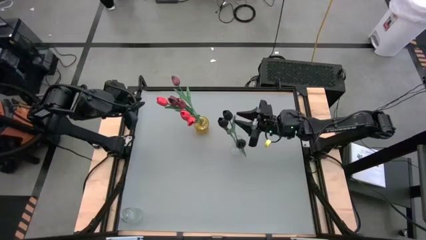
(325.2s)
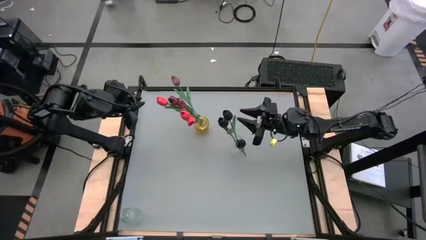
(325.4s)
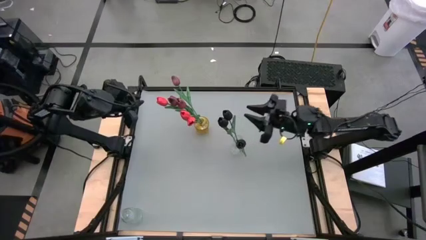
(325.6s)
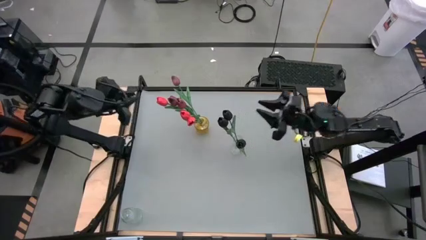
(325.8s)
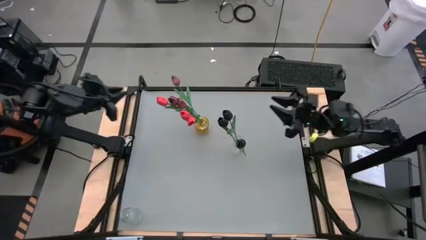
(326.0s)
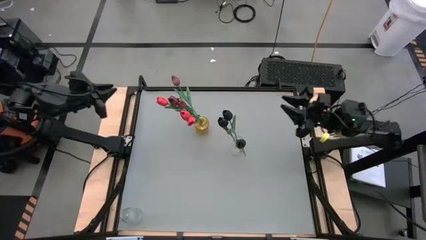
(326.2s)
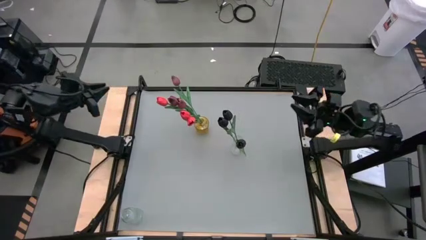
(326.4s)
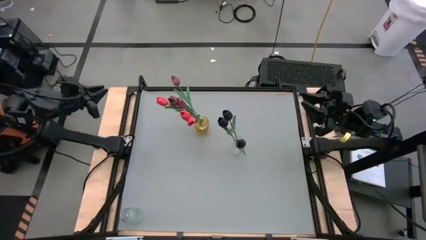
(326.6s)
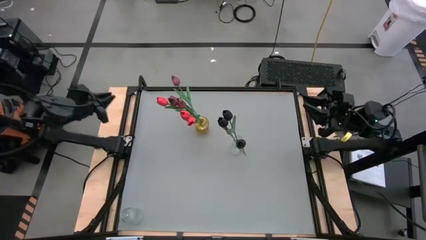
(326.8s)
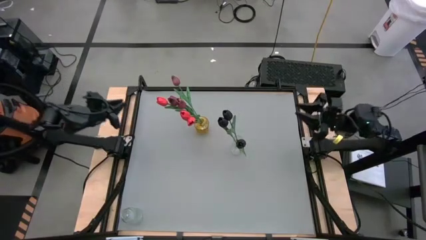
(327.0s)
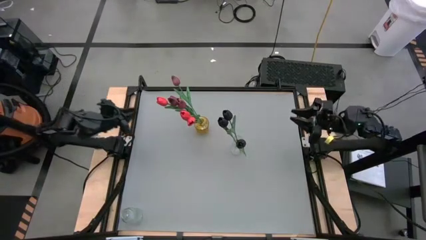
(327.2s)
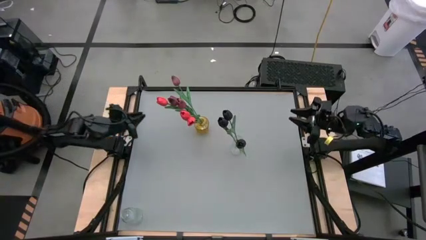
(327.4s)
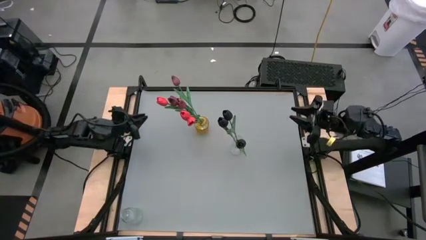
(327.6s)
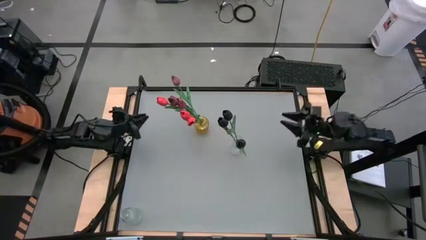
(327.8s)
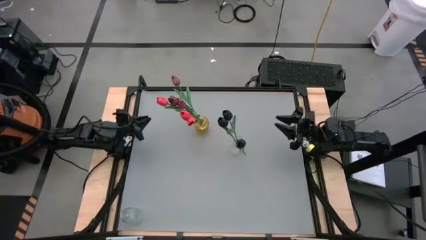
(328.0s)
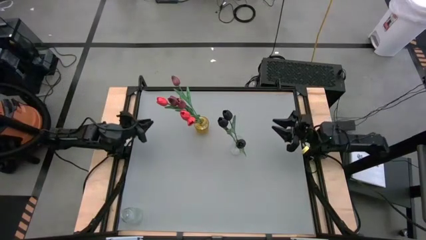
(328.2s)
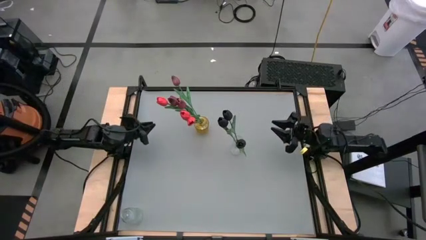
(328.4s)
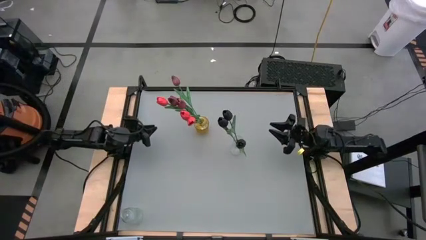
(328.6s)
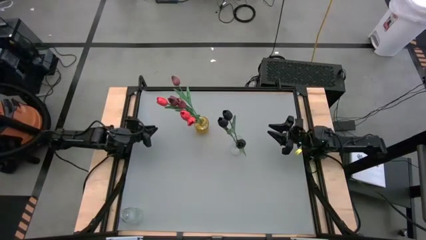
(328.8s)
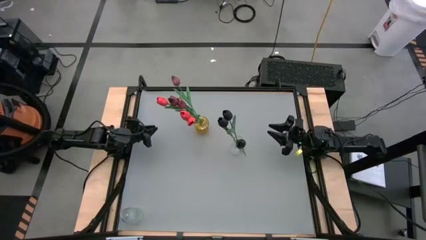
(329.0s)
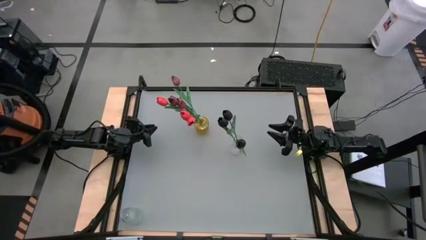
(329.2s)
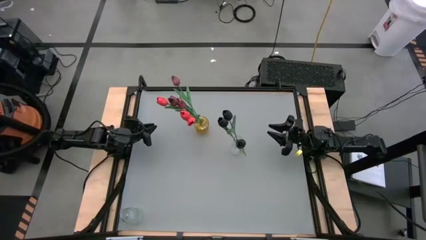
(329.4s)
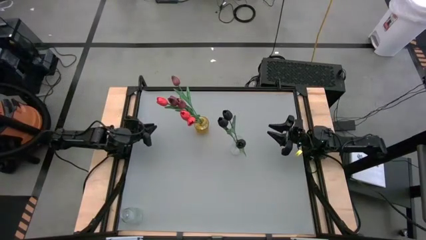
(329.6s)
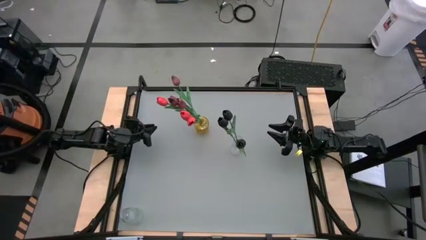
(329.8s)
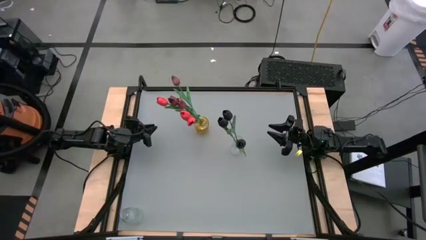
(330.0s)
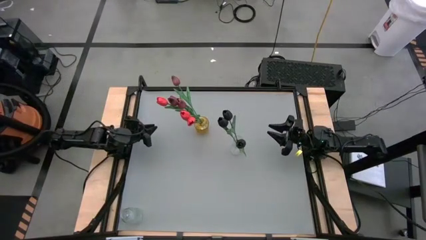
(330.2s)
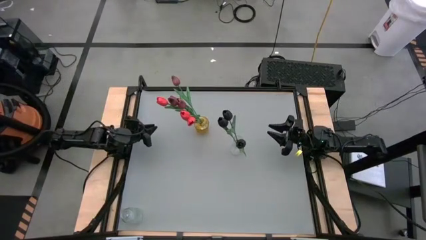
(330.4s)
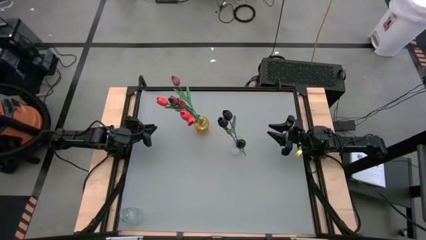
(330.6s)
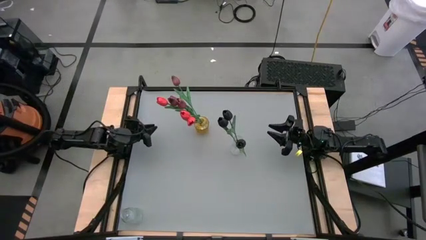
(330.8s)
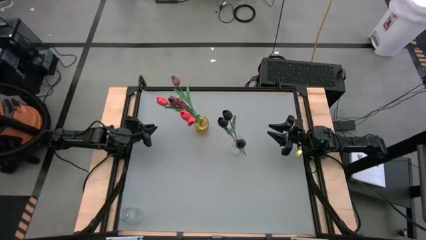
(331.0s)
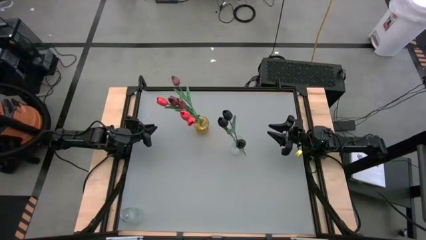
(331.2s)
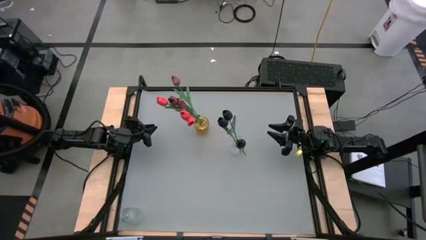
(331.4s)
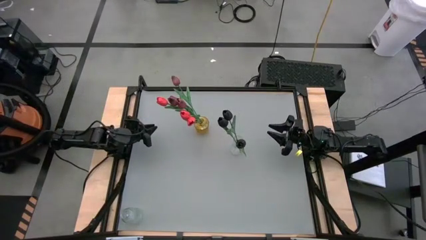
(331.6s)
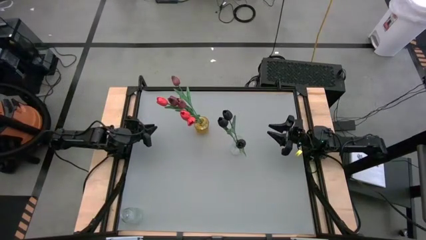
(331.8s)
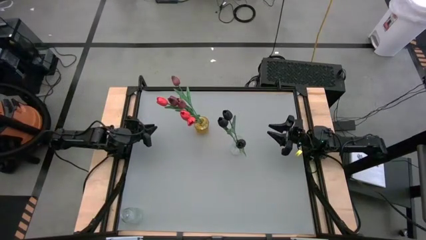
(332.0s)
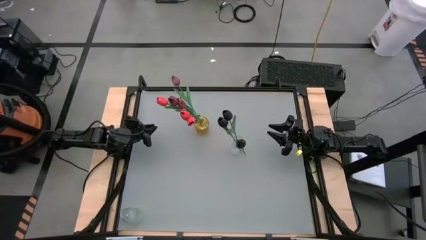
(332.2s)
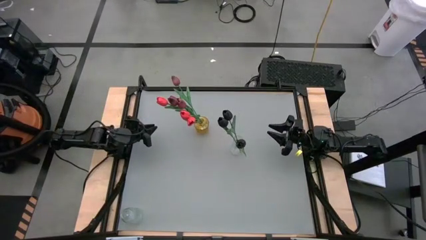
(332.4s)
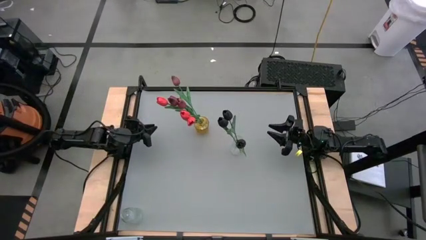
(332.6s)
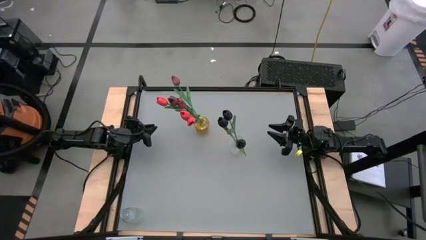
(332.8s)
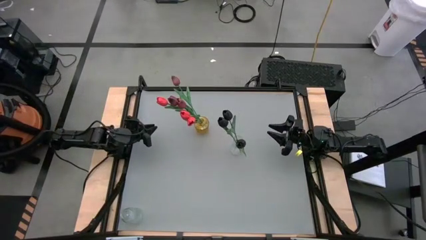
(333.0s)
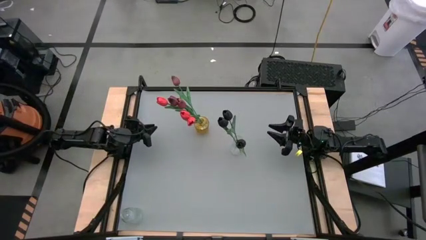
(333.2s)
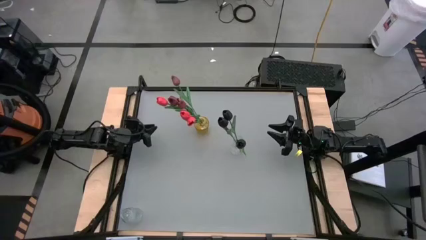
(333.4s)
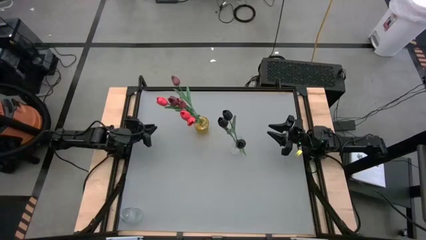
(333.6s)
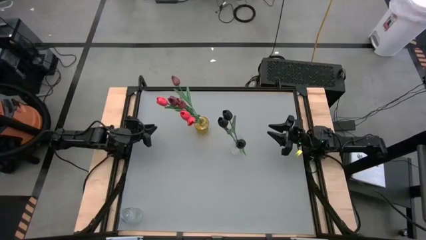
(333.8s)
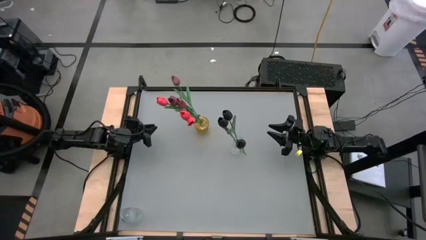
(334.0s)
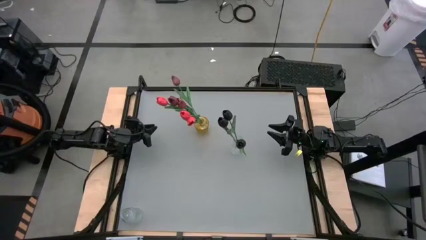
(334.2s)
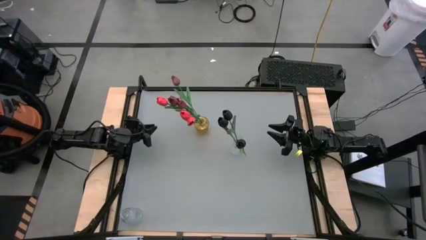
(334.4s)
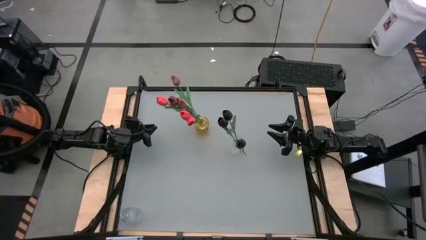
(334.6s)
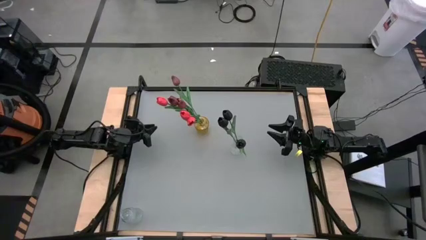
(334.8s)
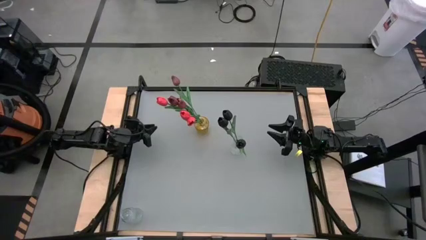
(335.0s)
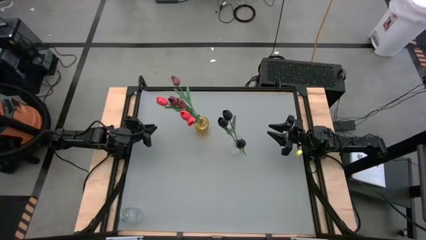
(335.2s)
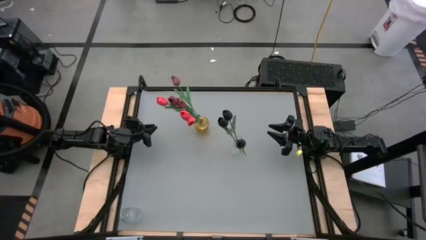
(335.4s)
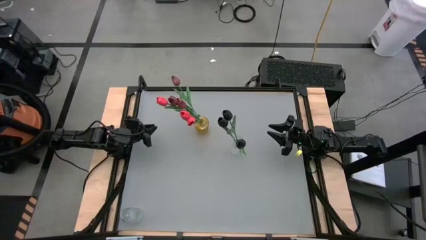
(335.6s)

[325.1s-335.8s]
Task: Sort flowers into vase by color
Return to Home Position
